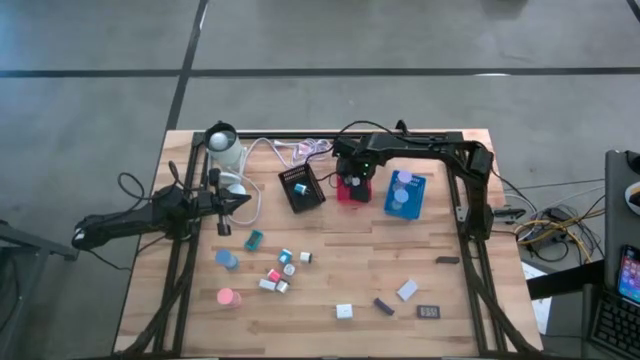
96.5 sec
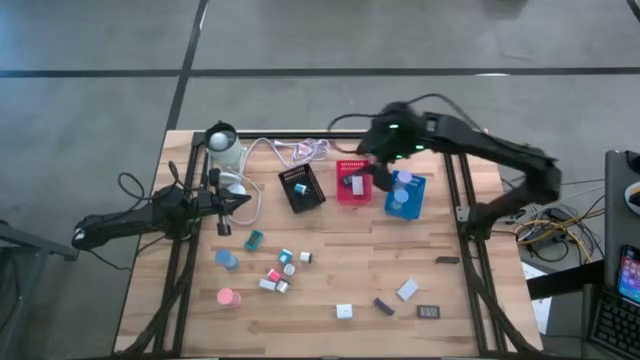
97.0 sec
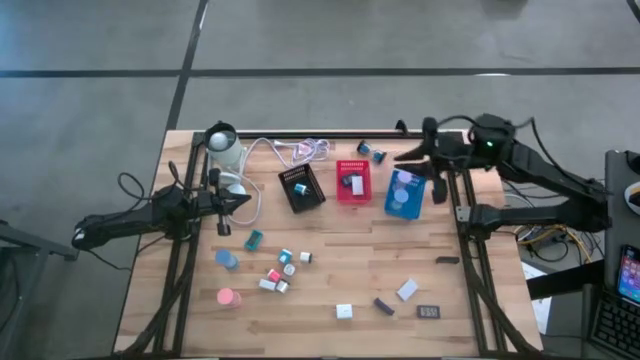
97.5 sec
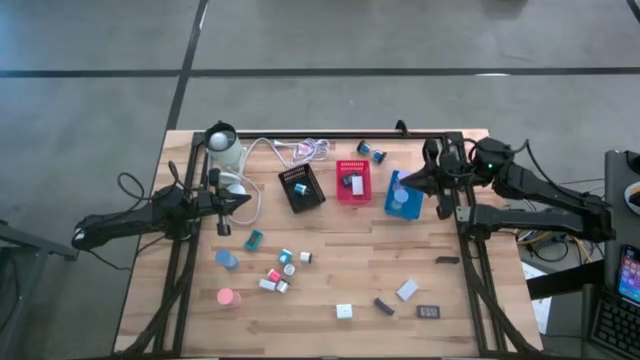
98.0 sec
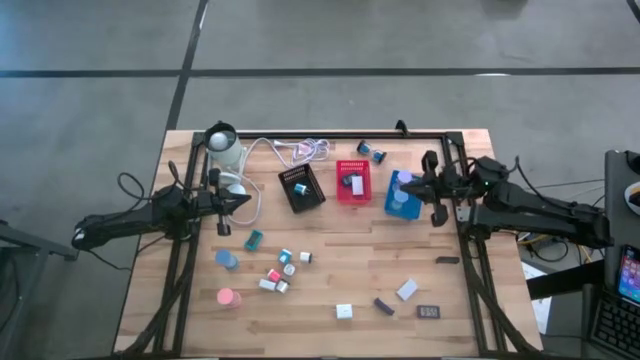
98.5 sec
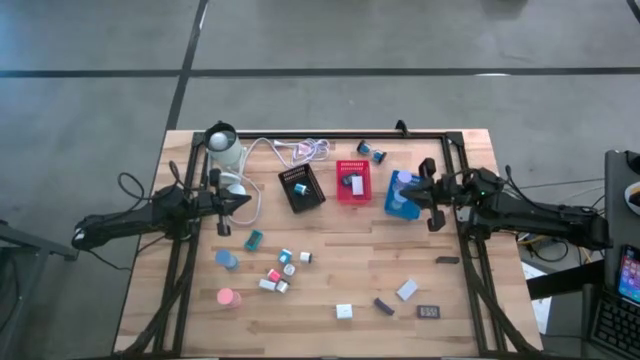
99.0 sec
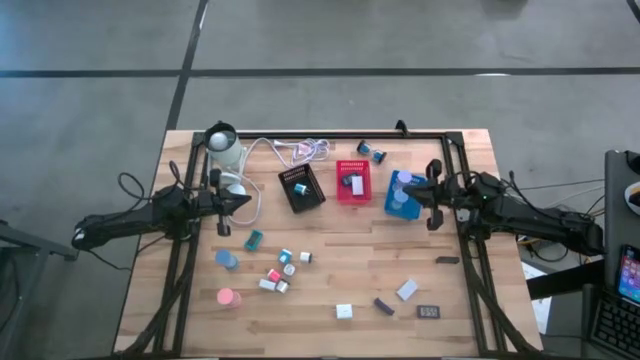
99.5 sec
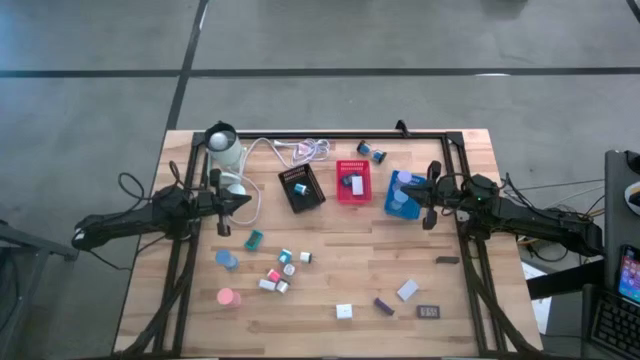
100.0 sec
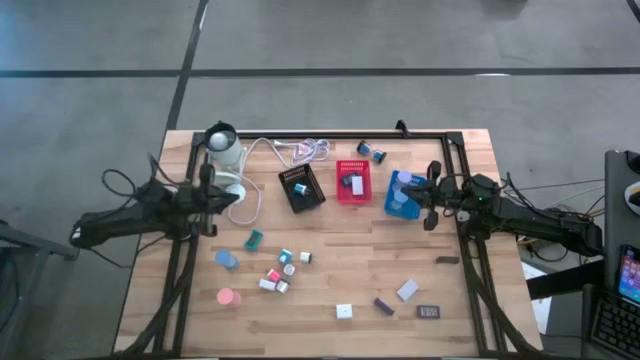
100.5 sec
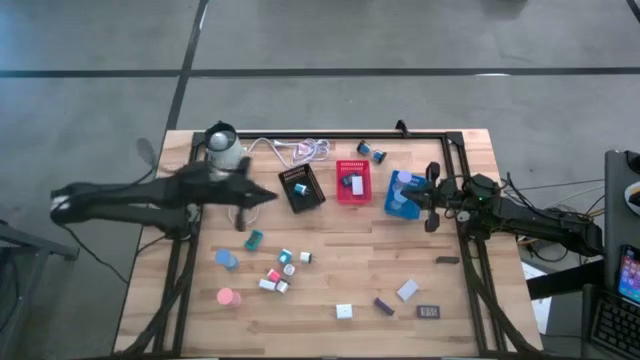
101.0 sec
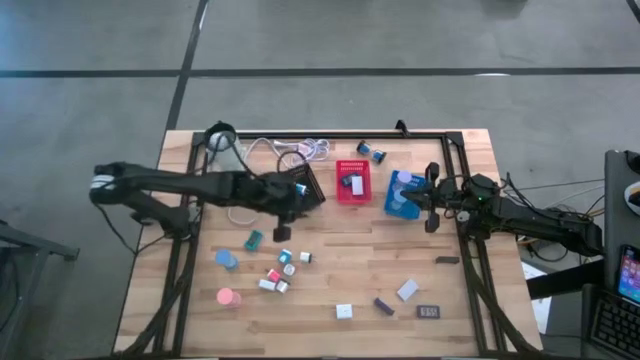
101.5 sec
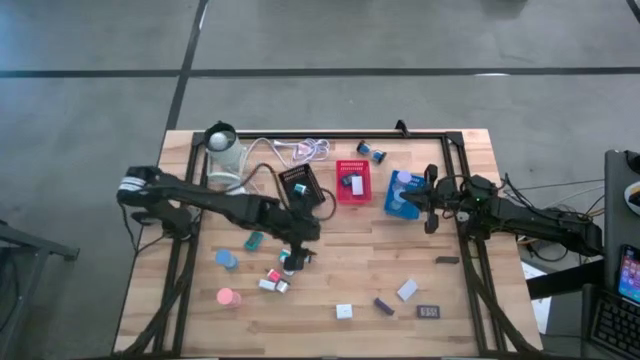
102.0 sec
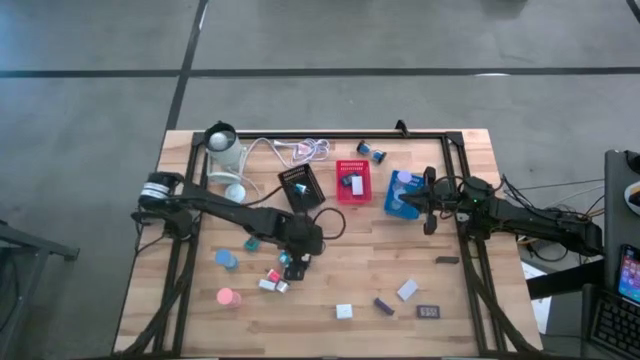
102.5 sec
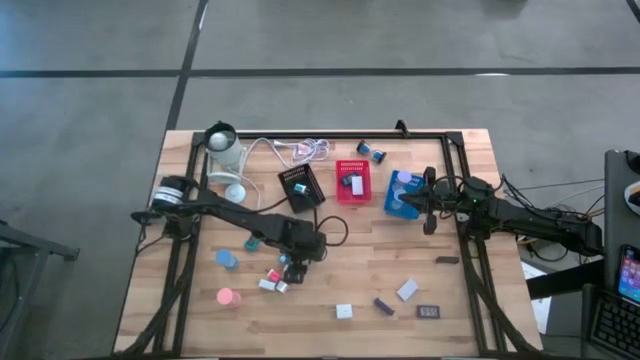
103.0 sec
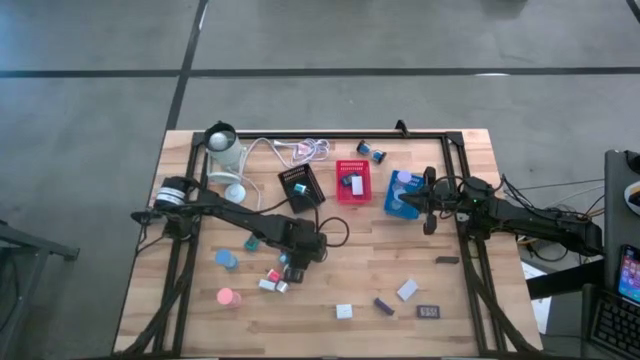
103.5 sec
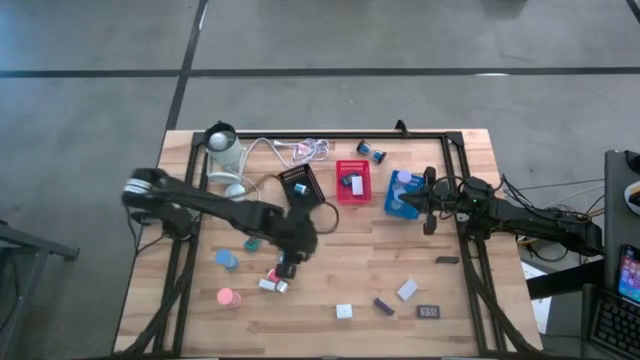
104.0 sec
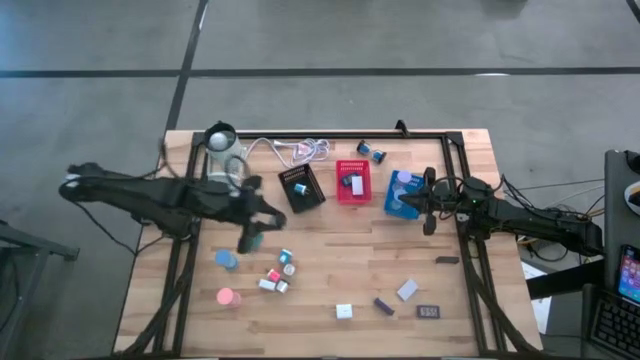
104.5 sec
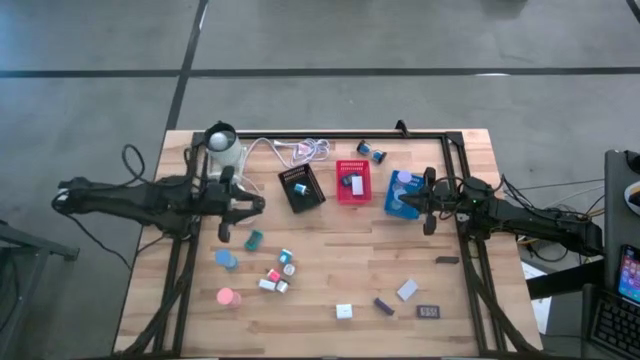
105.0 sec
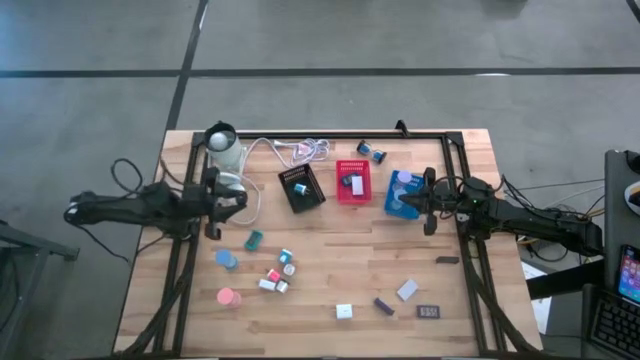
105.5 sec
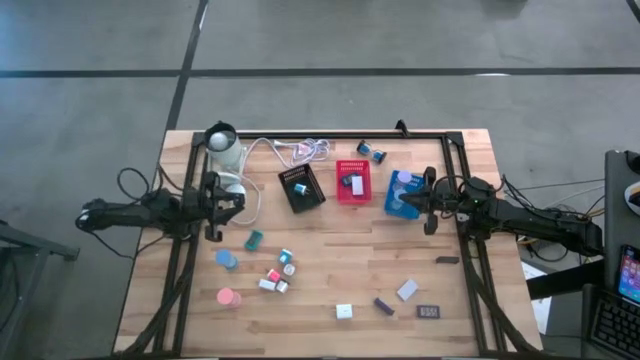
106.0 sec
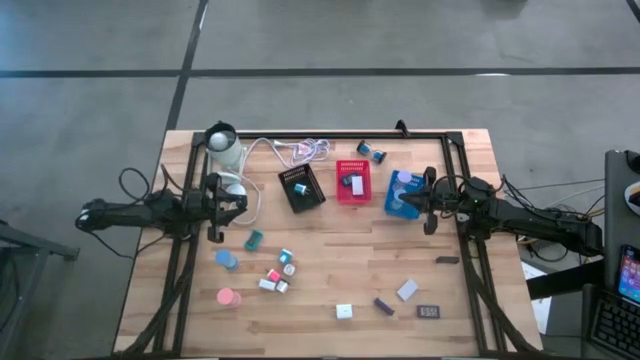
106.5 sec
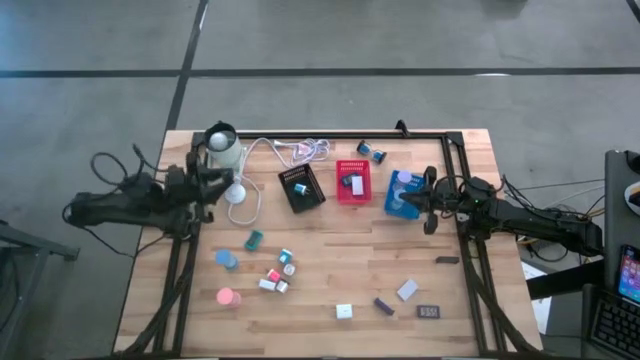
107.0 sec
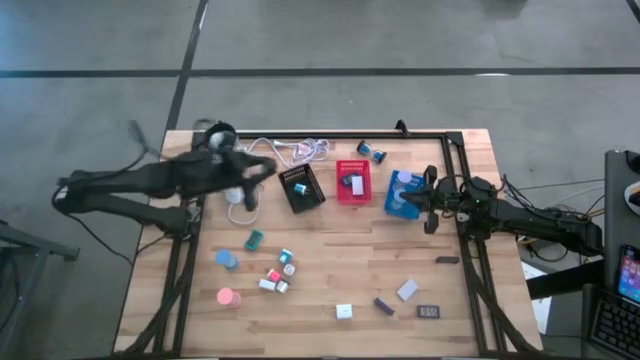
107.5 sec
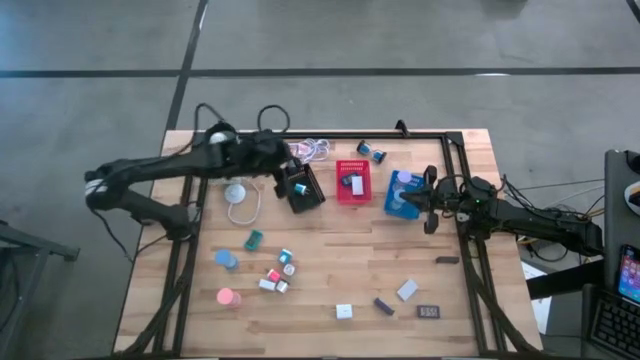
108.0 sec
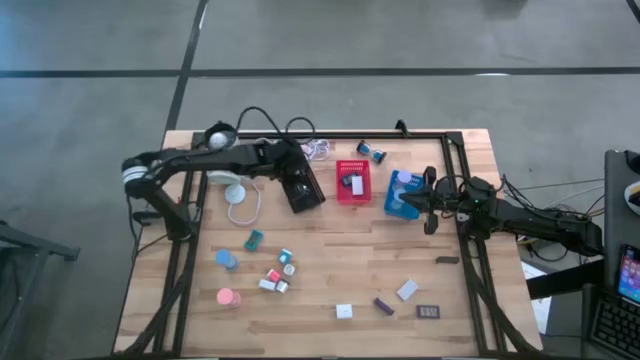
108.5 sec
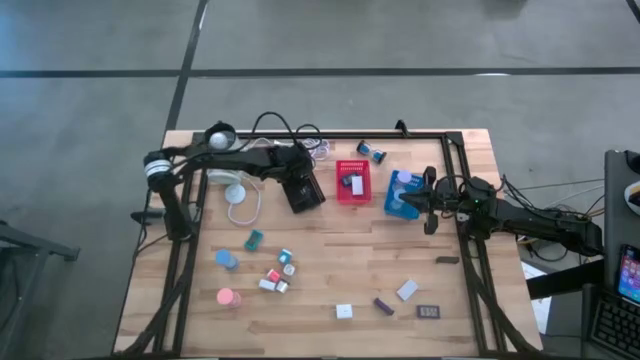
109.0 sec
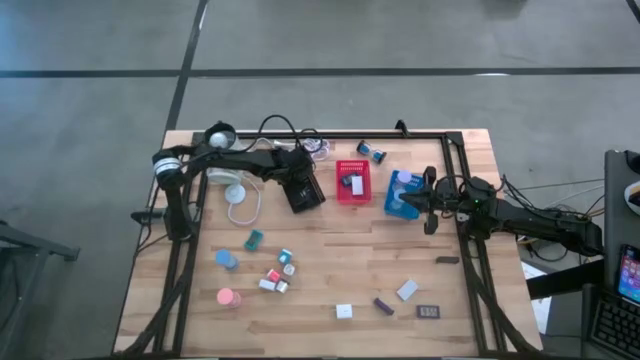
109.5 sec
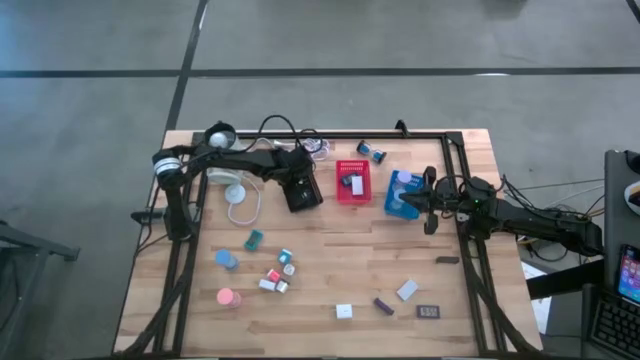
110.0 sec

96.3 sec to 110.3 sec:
Task: Pick & Place Office items
Put the top white black charger adapter into the black bin

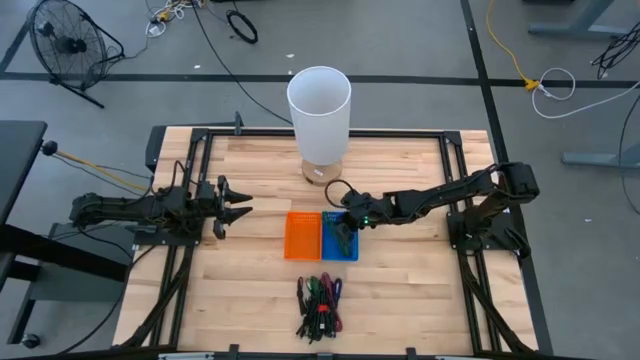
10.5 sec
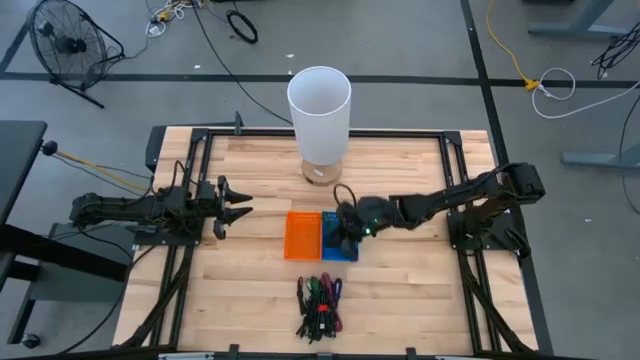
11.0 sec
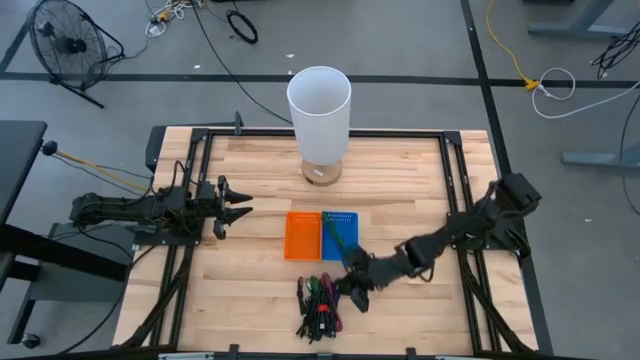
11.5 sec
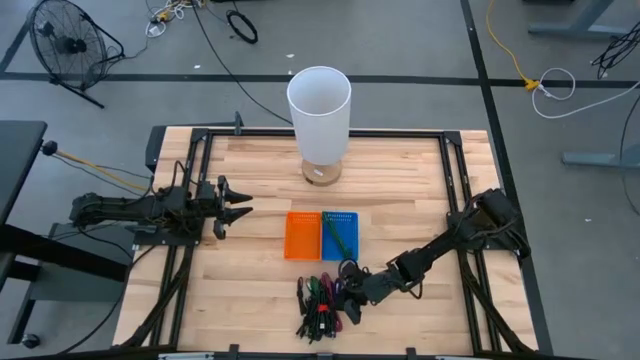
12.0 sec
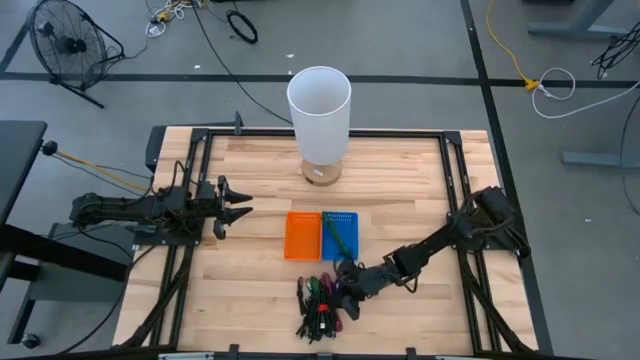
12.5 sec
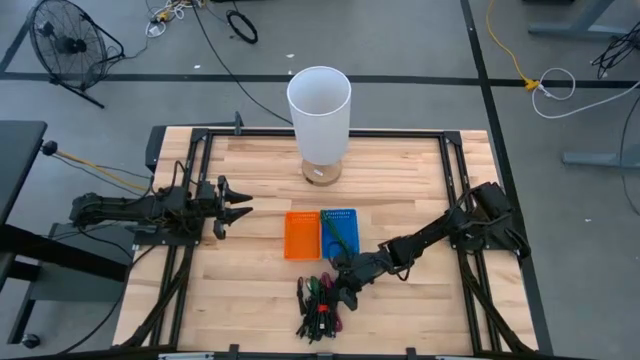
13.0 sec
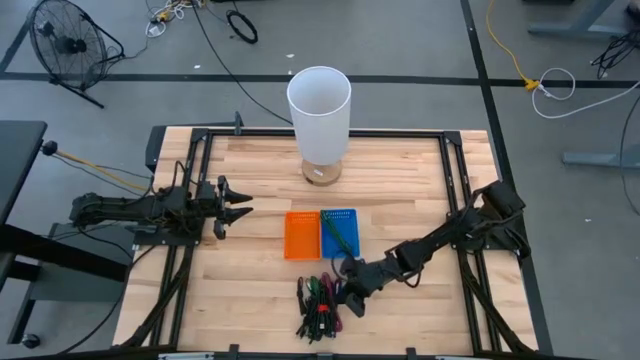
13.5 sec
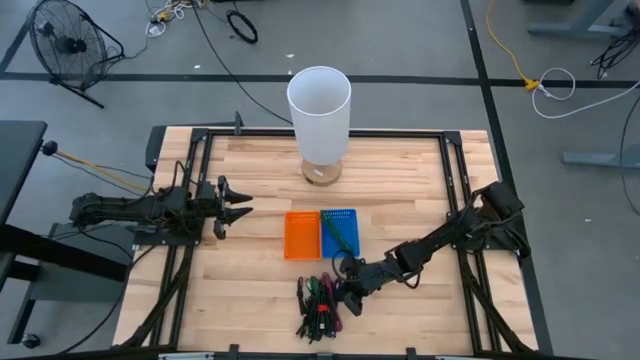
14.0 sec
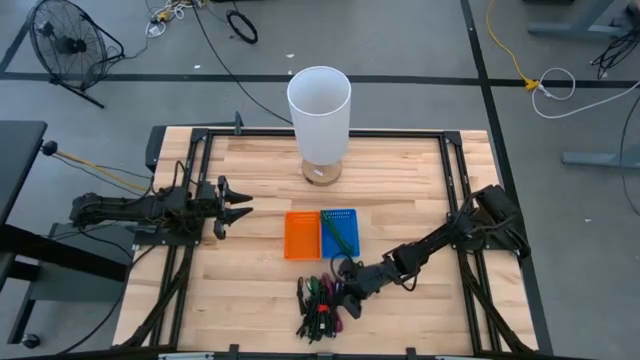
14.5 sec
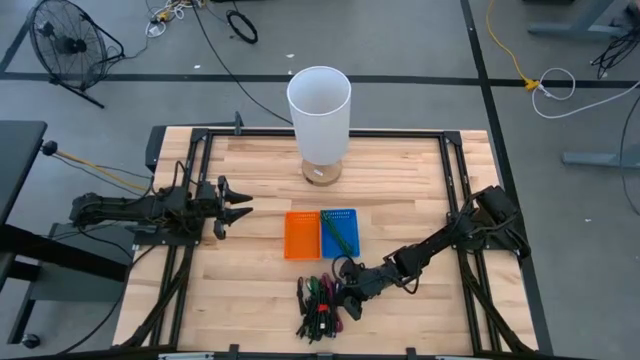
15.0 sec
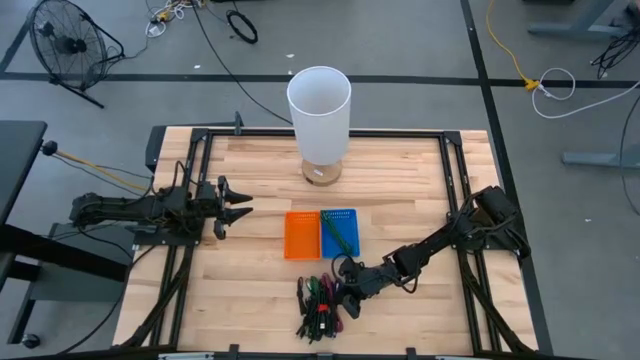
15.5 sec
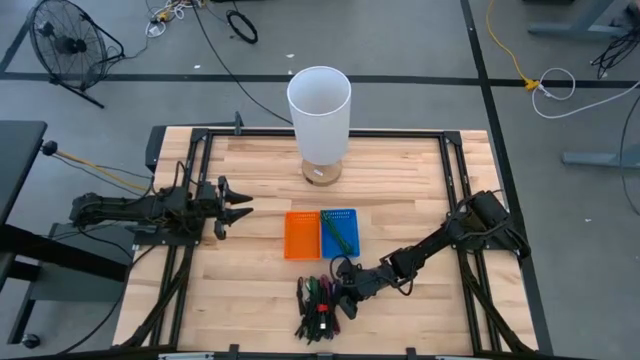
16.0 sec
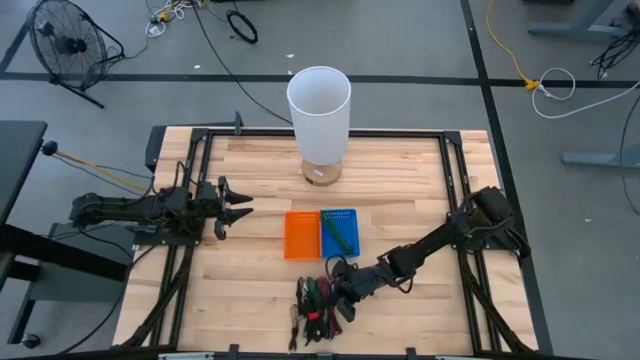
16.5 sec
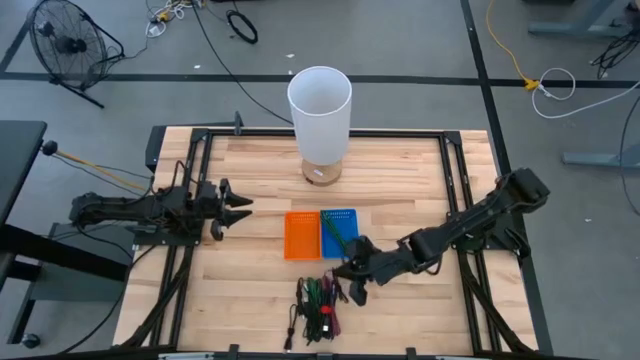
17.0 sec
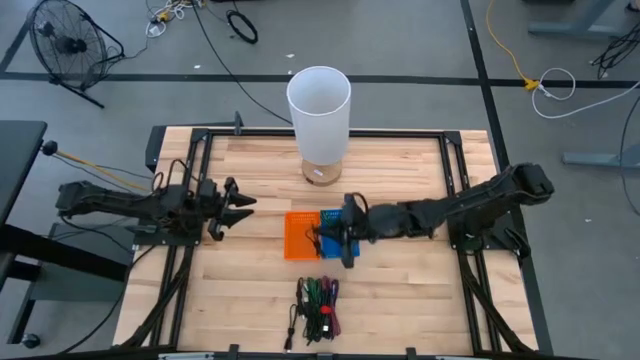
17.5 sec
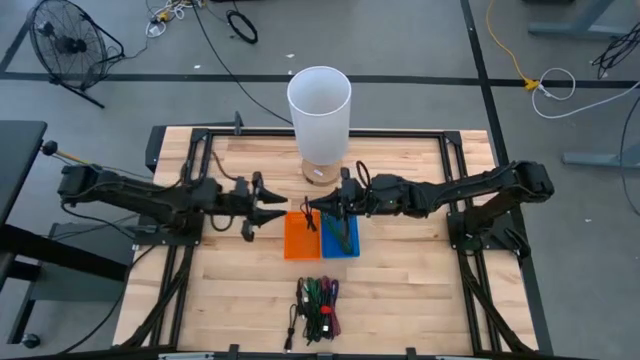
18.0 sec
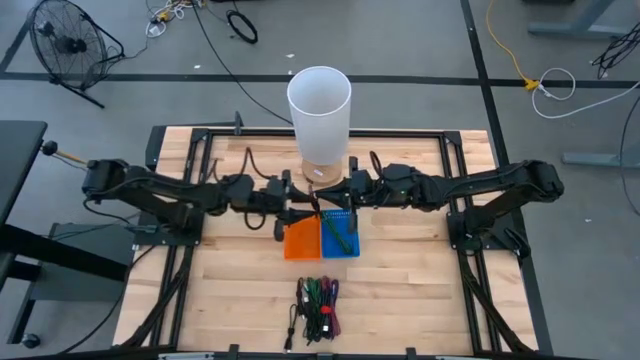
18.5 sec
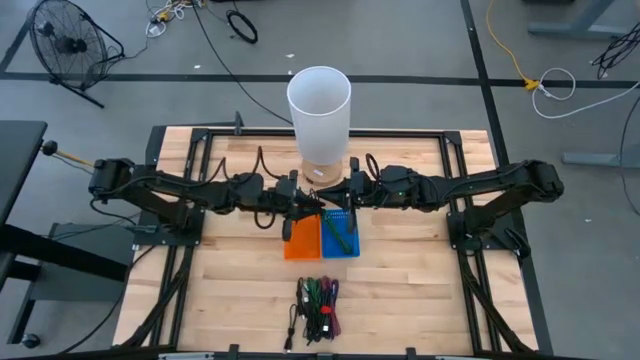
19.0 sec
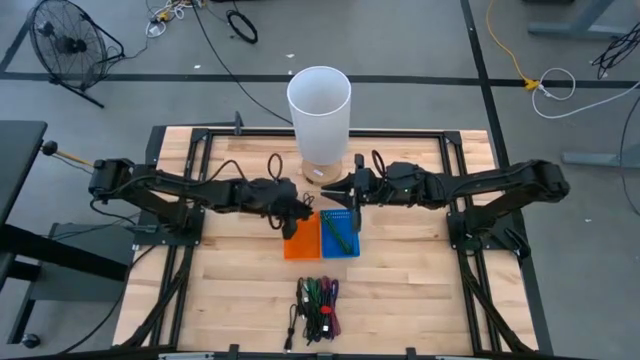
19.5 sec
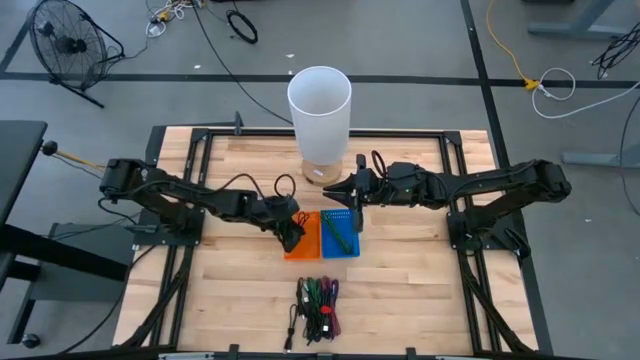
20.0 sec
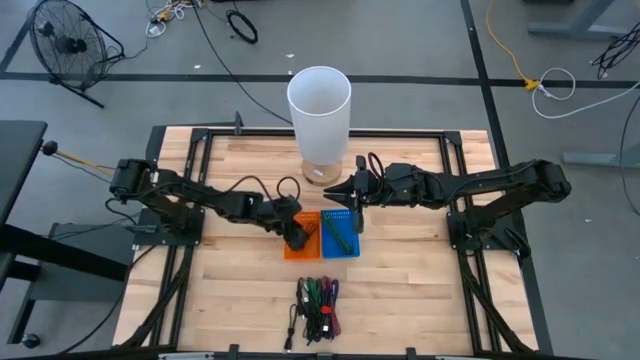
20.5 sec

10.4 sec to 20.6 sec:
Task: Pick & Place USB Port
Put the black USB cable into the orange bin
